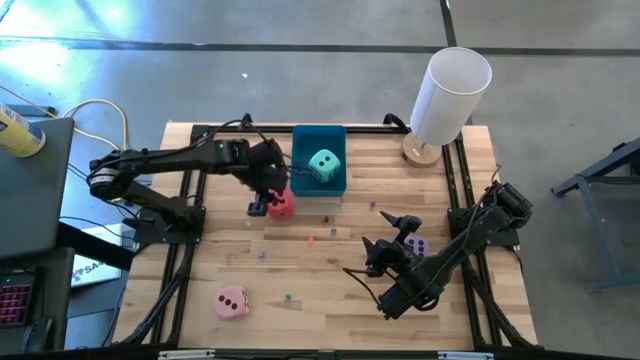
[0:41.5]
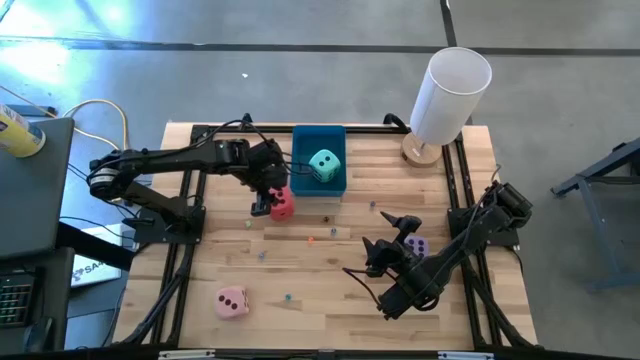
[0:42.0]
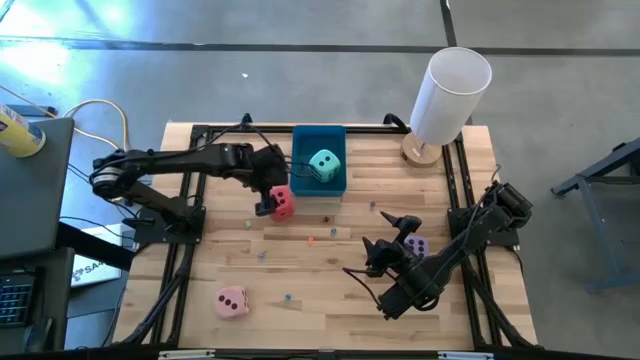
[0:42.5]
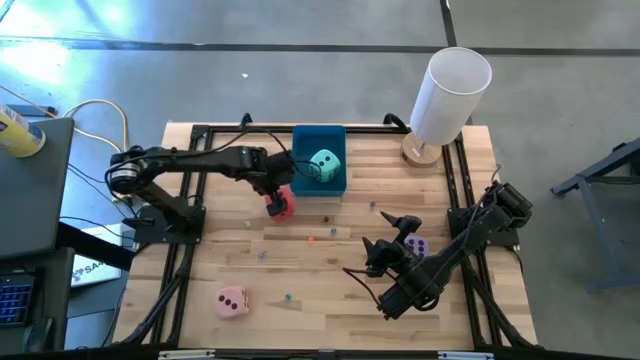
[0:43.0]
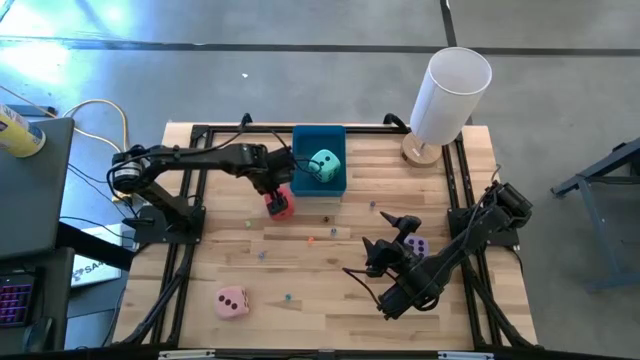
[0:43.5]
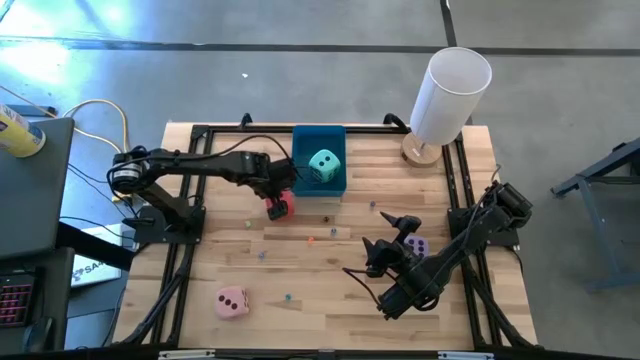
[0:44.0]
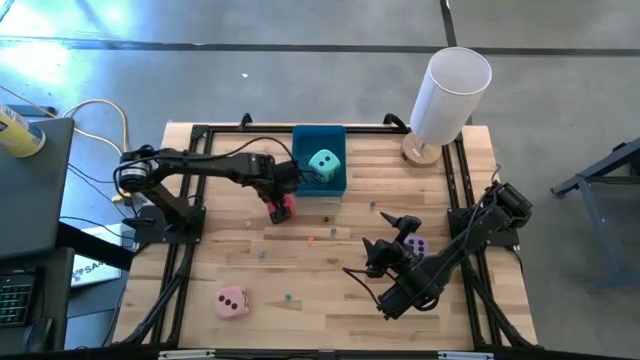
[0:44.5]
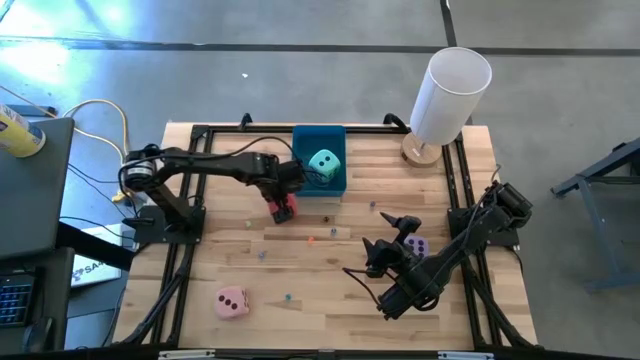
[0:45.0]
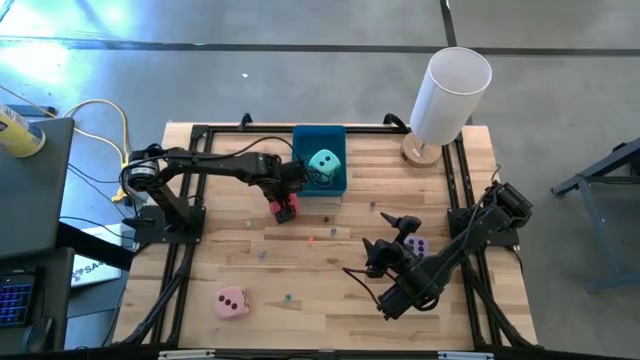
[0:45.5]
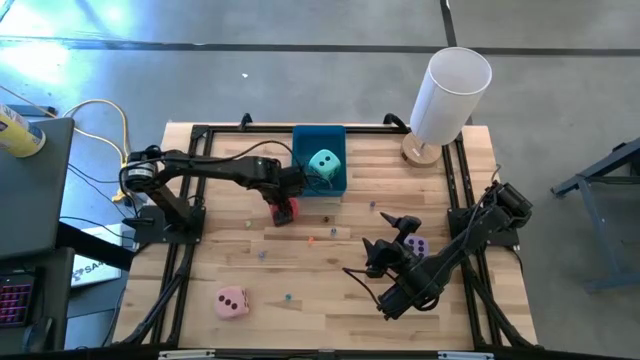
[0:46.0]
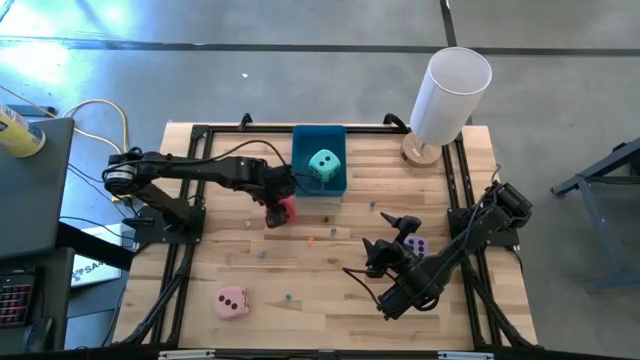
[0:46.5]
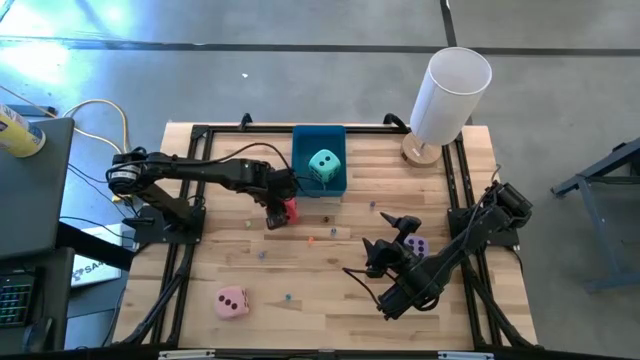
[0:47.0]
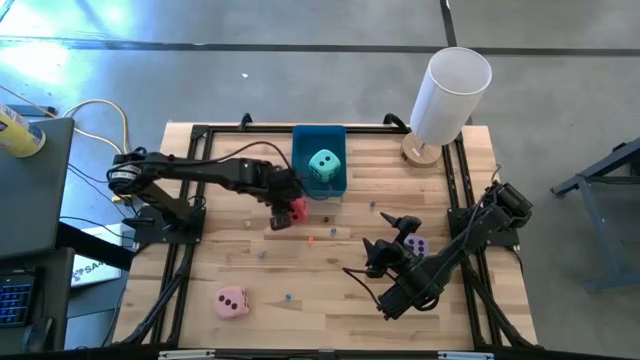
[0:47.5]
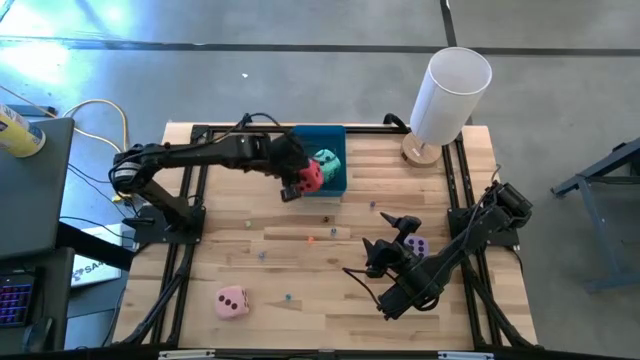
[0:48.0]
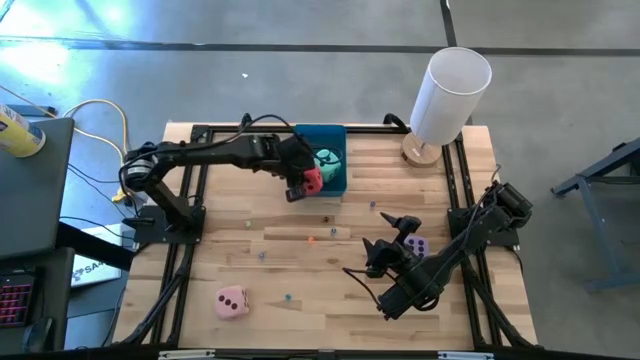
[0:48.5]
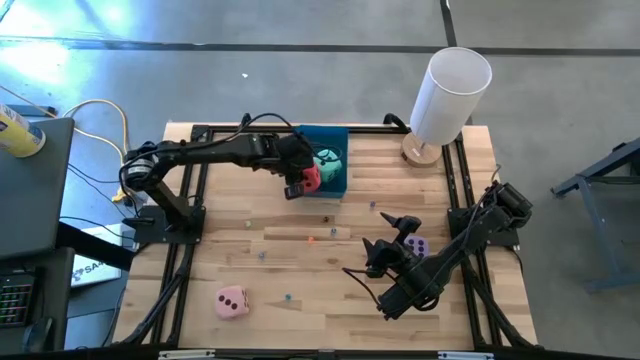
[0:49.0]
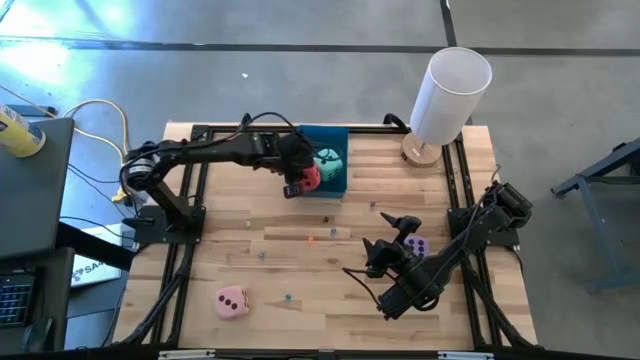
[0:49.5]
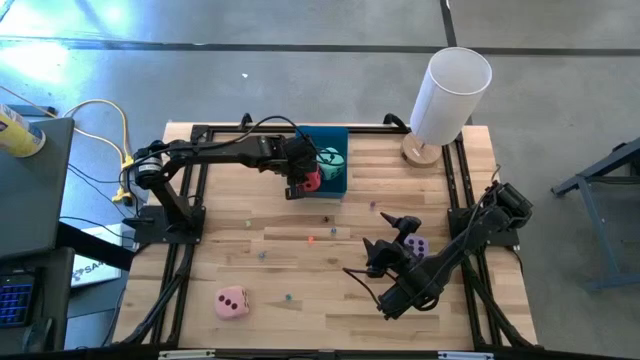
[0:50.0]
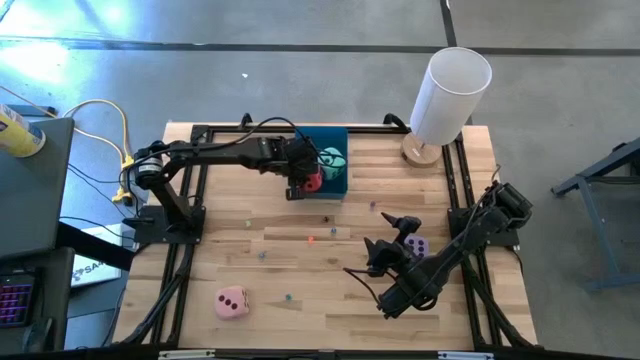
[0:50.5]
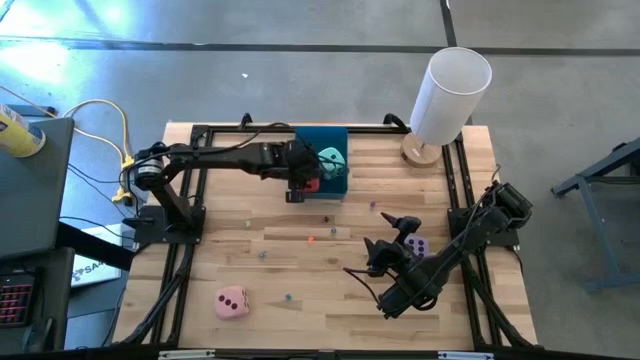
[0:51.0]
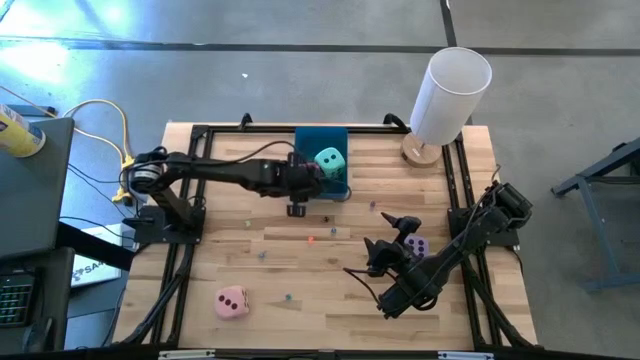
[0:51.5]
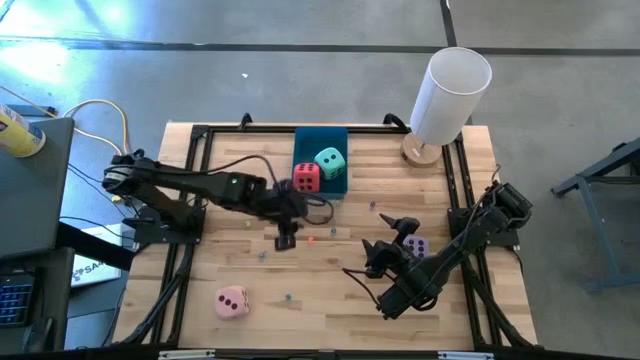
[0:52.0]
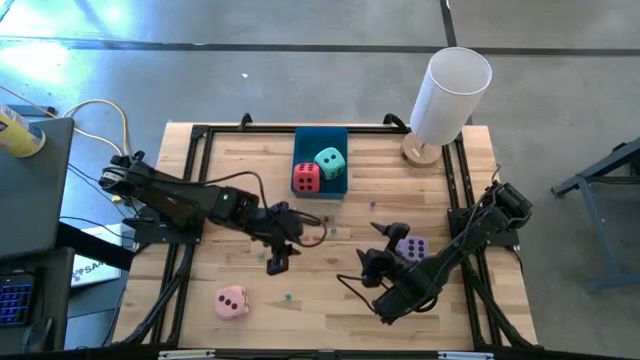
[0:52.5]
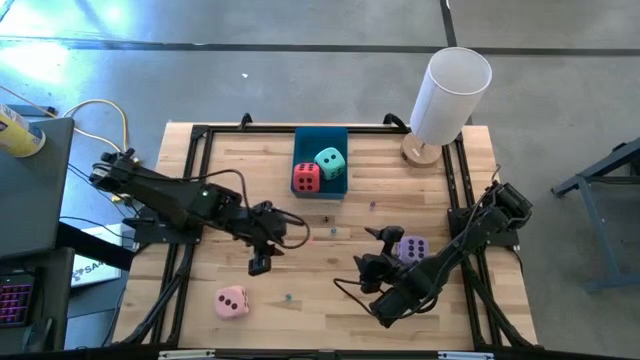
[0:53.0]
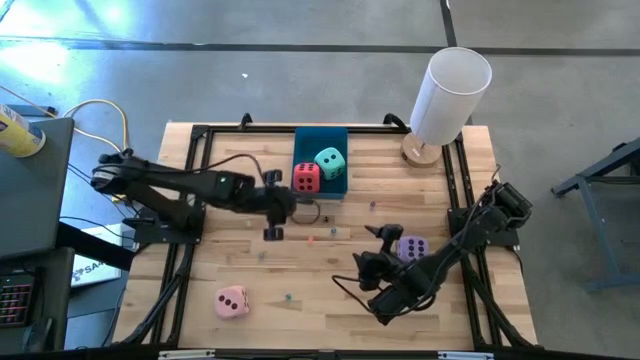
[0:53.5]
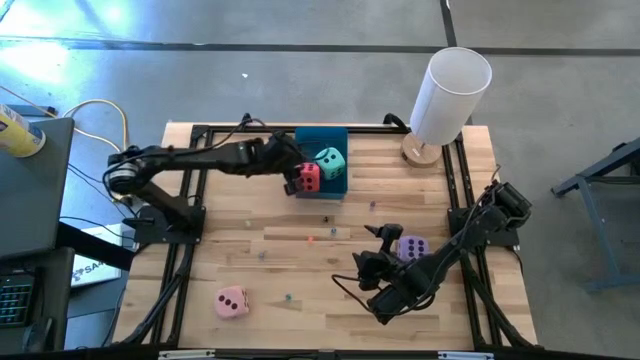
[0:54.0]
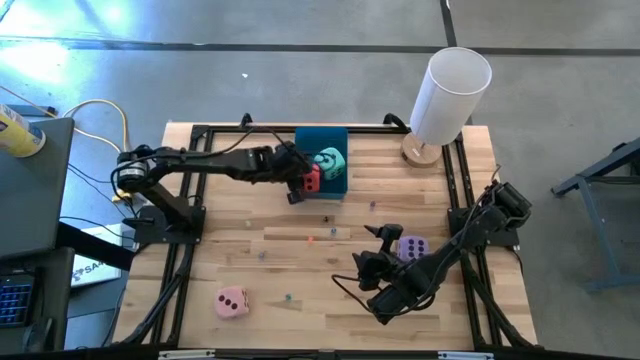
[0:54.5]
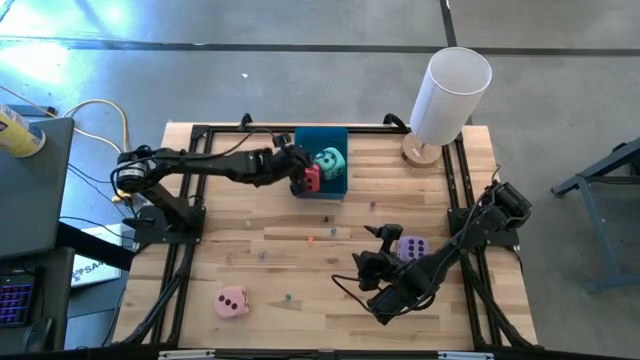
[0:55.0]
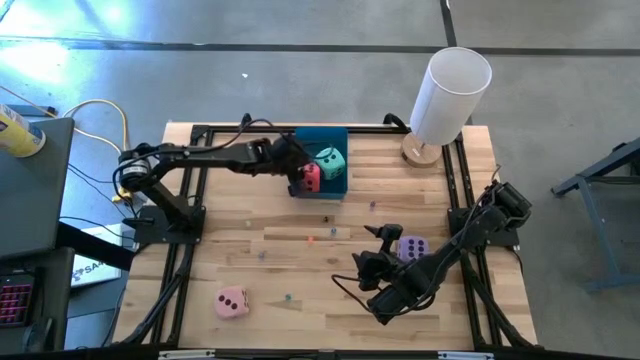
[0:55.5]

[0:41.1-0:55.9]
Task: Pick & Place Dice
Put the red die into the blue bin

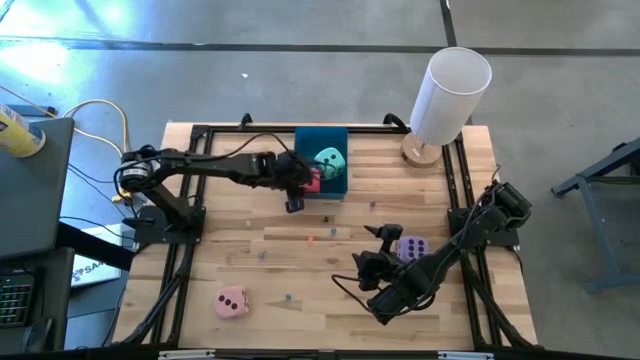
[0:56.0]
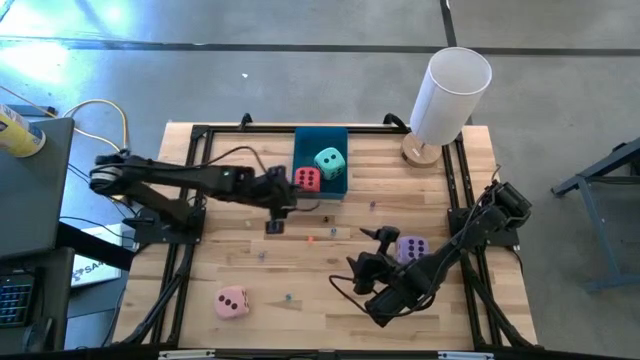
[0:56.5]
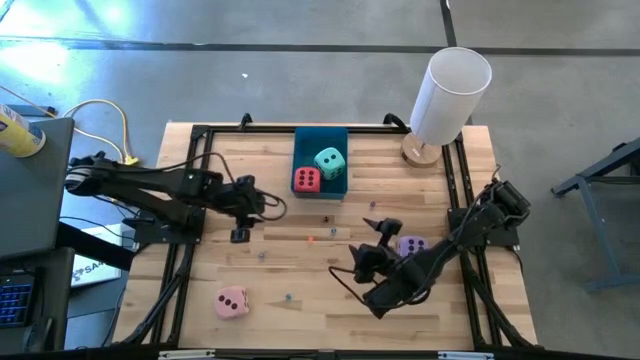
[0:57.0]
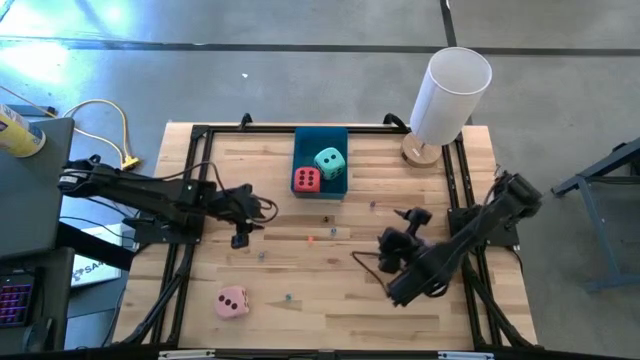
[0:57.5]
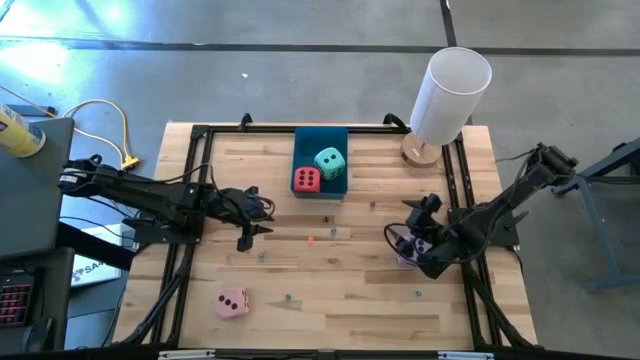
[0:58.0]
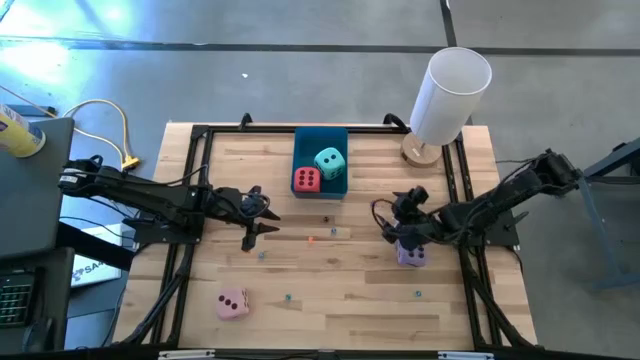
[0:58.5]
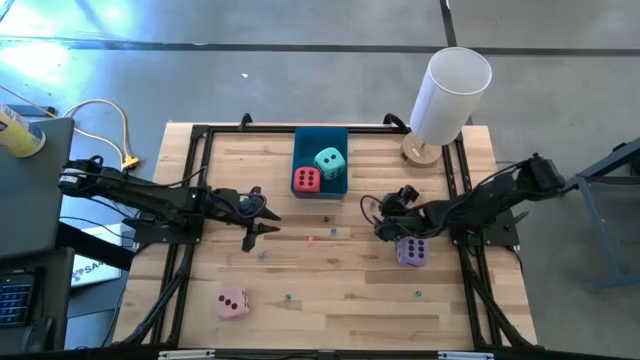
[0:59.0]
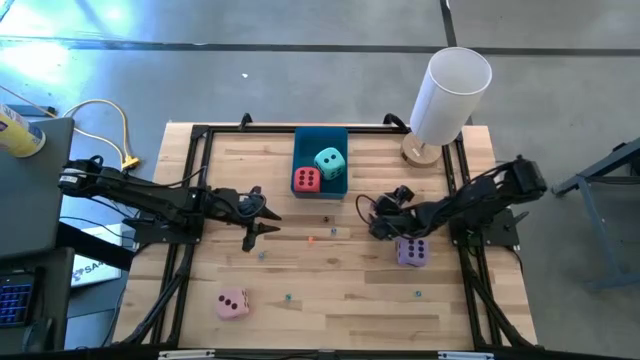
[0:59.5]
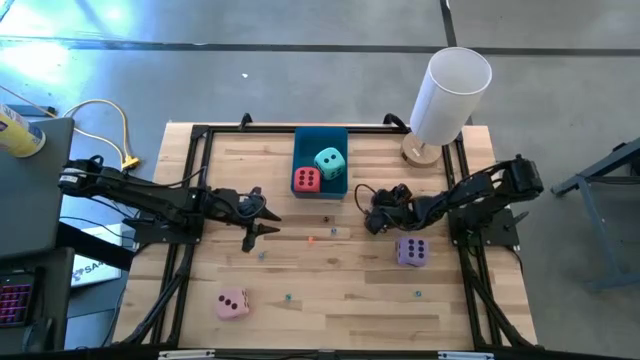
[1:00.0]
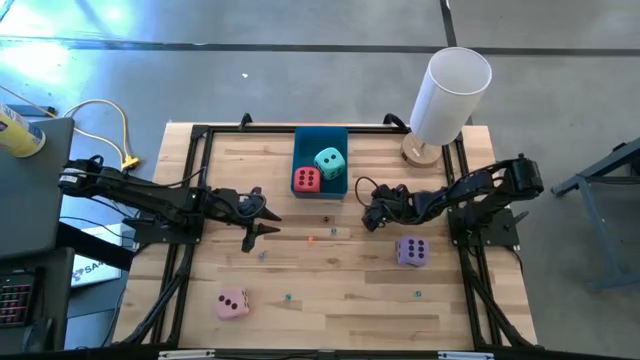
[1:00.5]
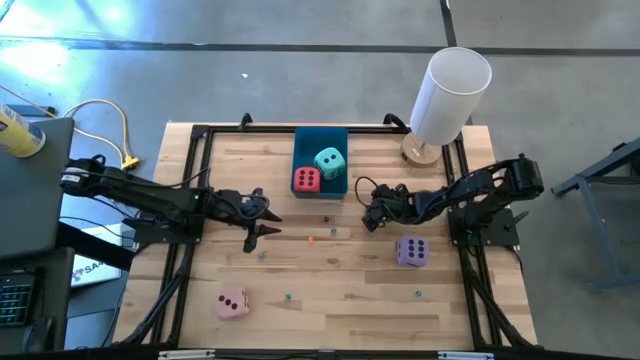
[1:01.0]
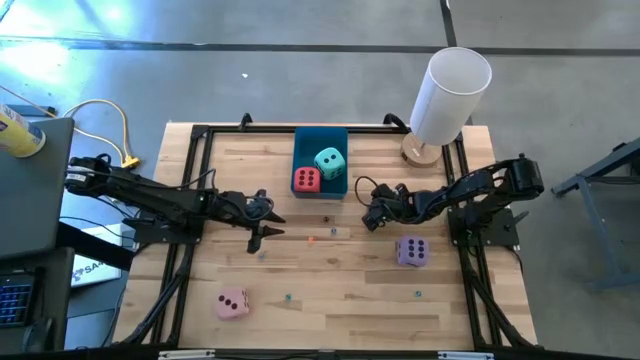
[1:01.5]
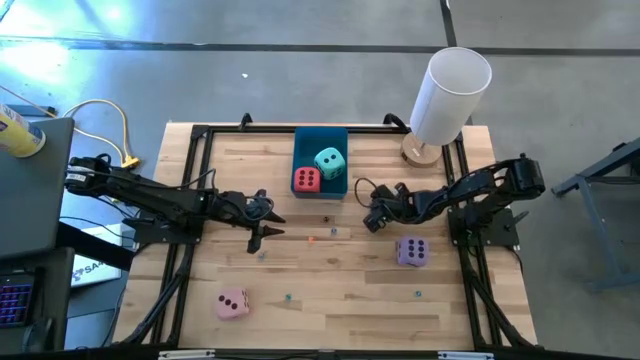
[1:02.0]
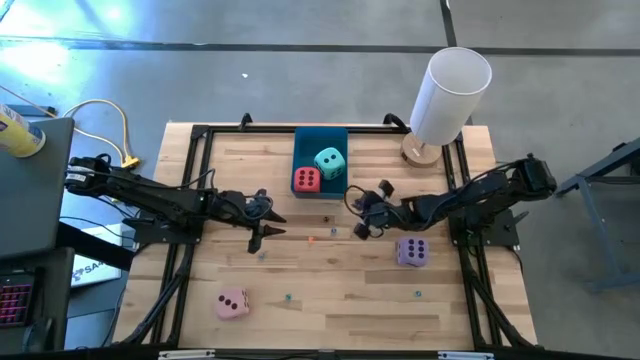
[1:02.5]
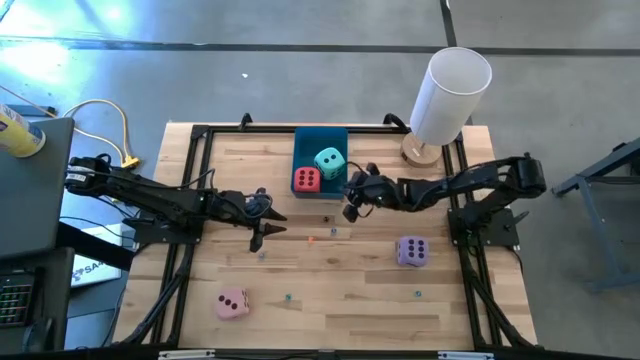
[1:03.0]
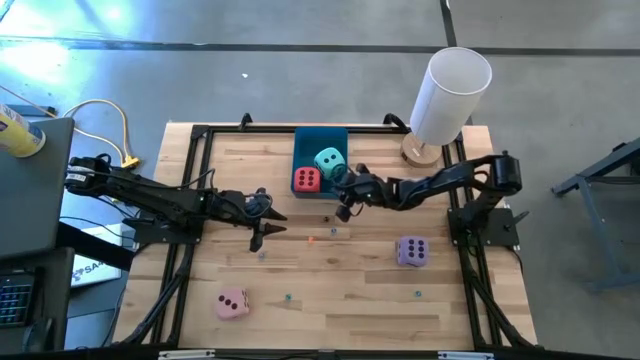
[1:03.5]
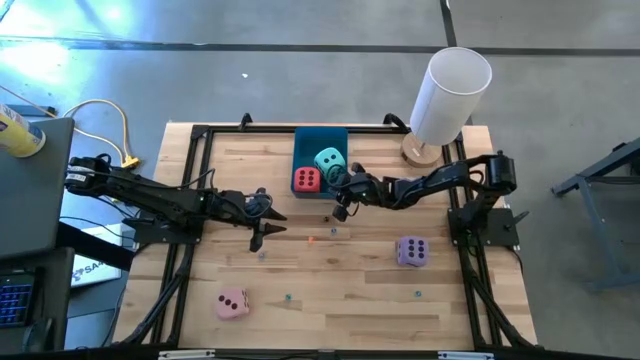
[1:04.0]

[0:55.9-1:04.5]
Put the small blue die into the blue bin
